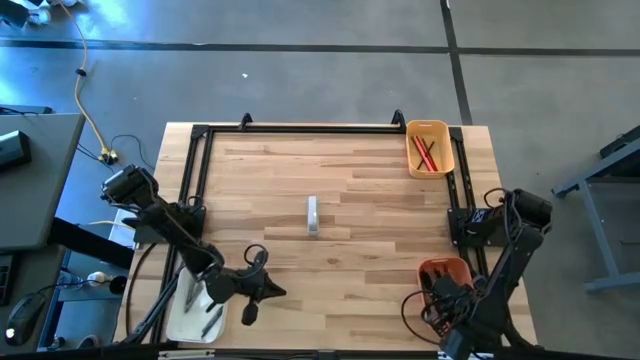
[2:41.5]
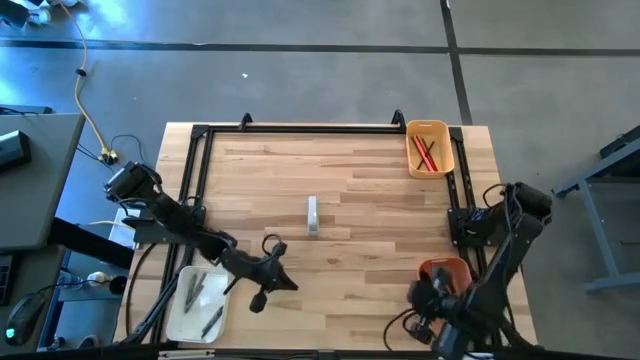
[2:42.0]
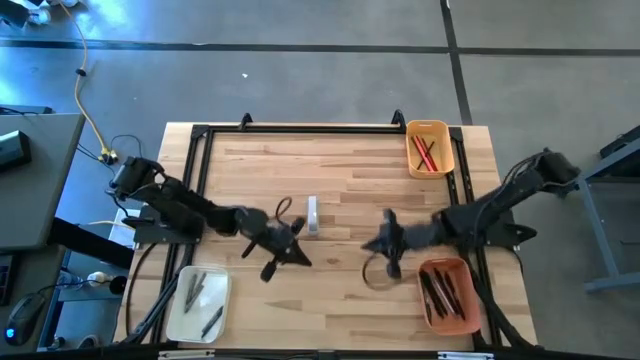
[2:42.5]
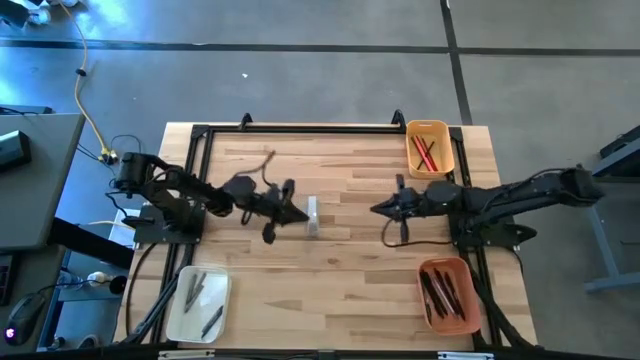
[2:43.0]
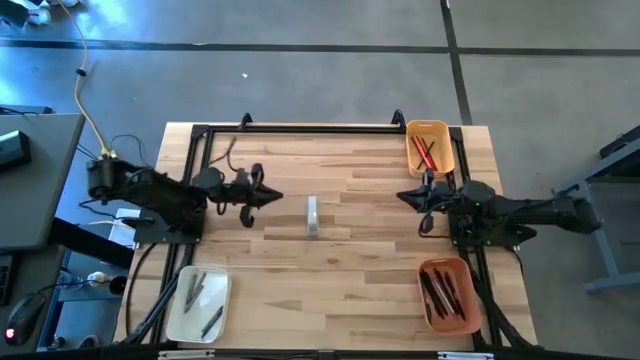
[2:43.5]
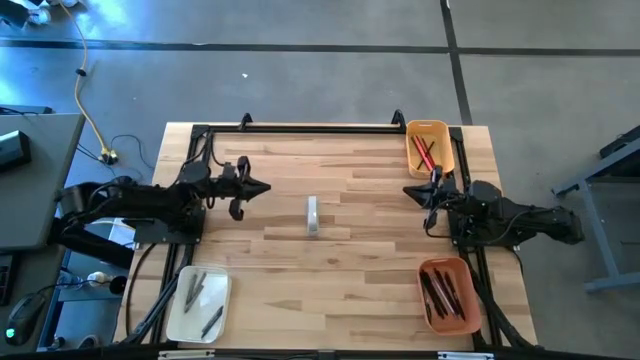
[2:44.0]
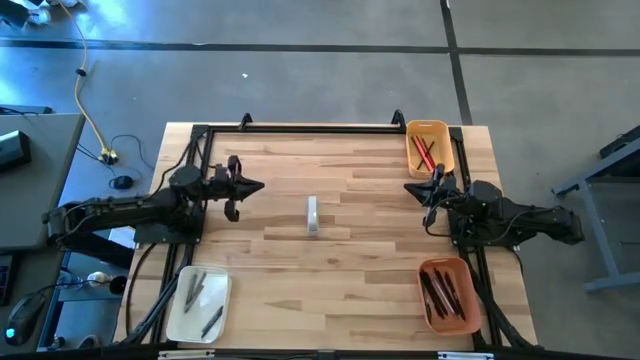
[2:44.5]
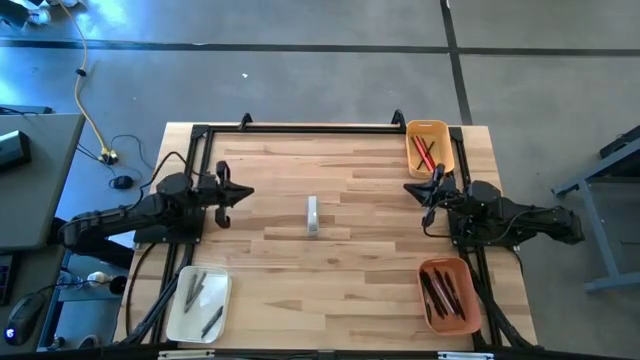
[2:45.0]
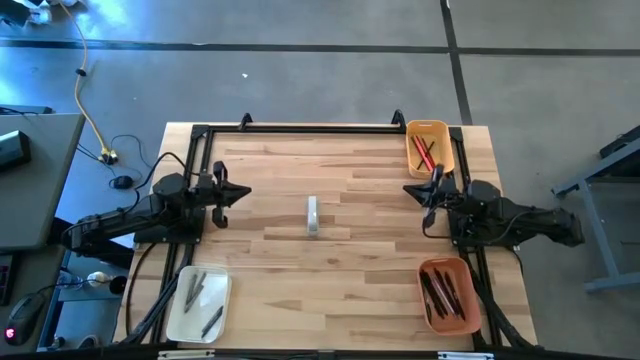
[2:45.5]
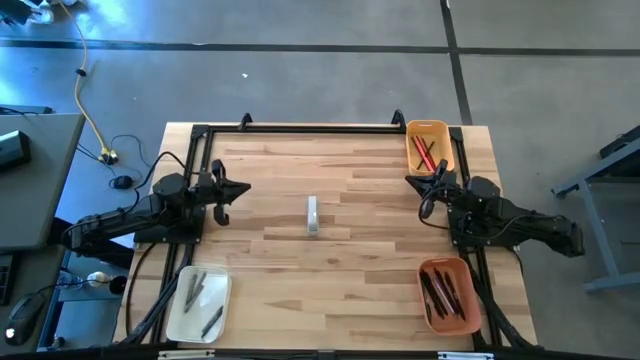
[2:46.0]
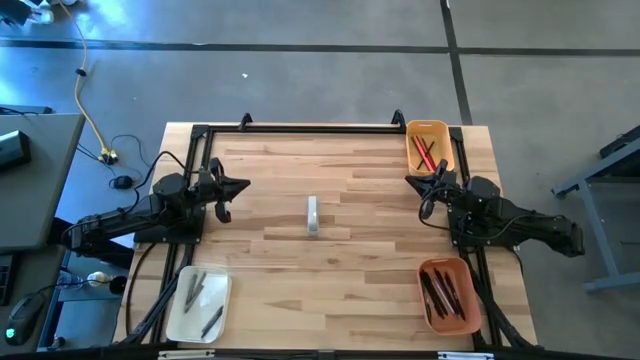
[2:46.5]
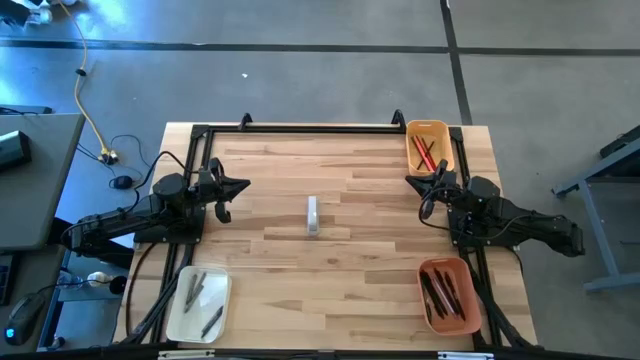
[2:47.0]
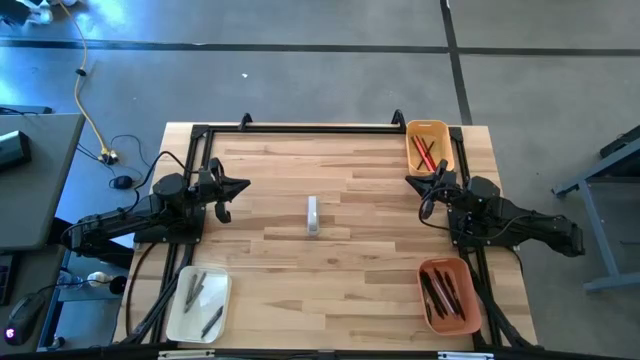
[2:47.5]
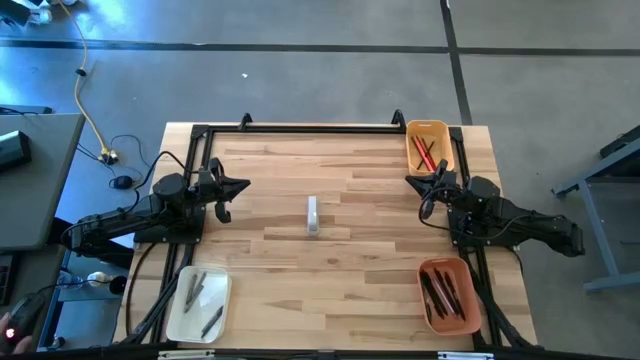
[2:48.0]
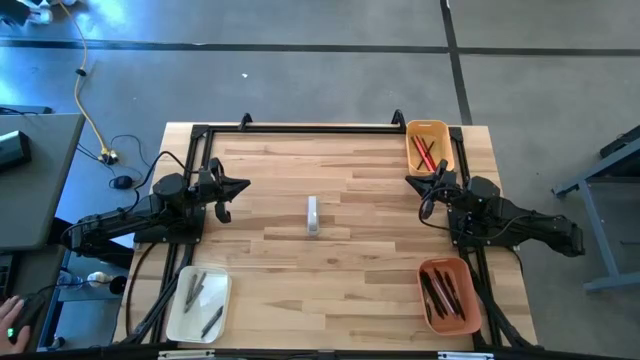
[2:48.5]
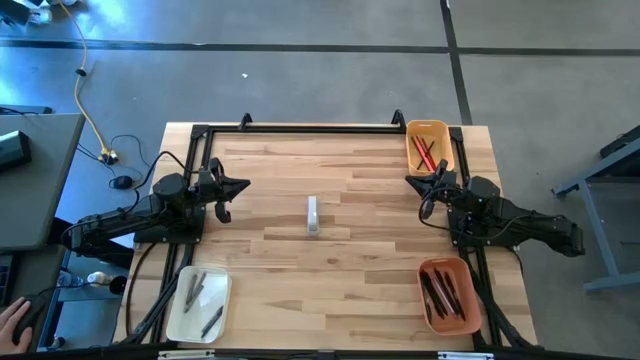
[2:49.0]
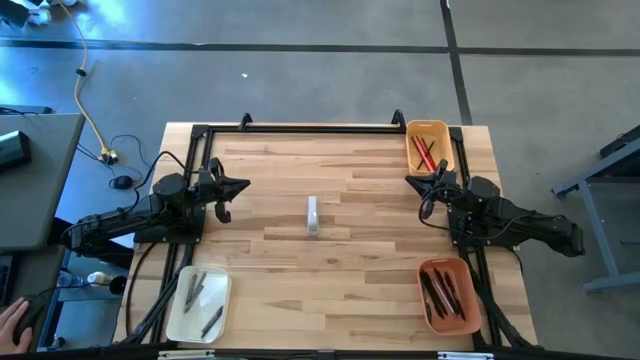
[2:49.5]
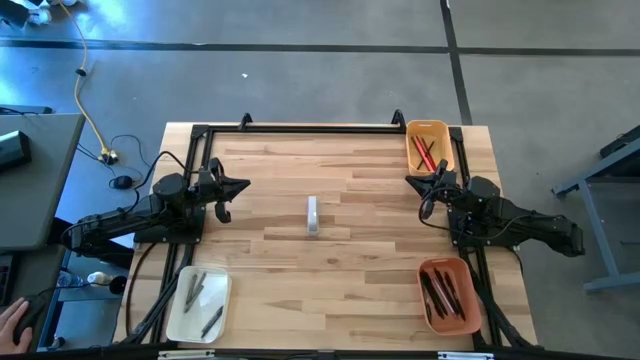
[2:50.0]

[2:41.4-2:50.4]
Task: Sort crayons/erasers/pens/pencils in bins
Return to Home Position

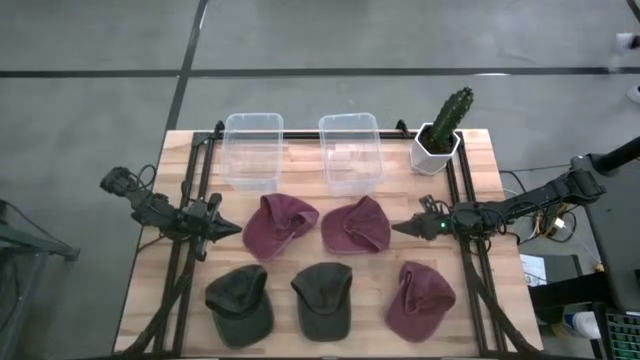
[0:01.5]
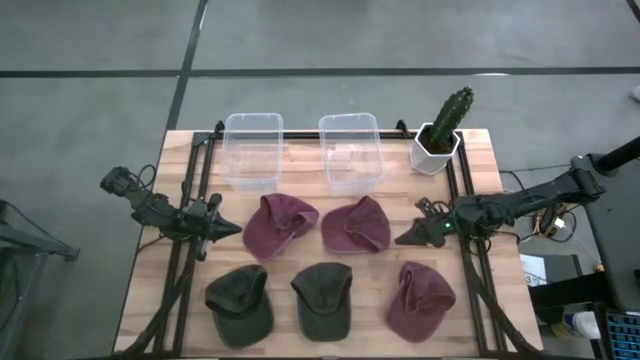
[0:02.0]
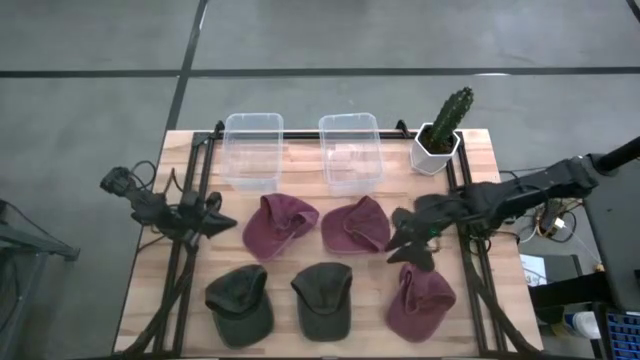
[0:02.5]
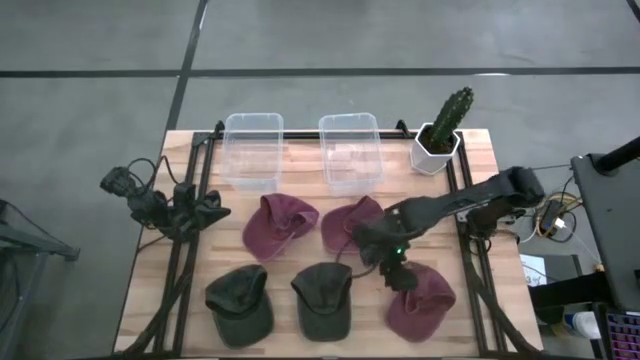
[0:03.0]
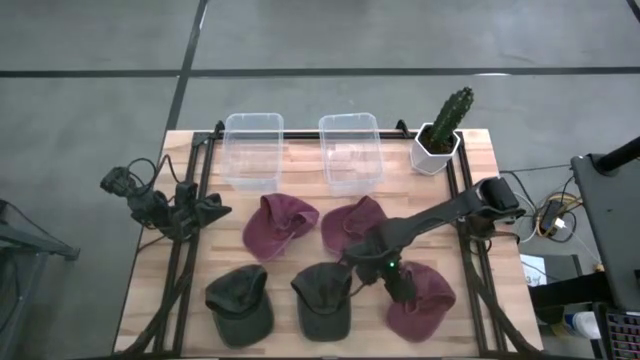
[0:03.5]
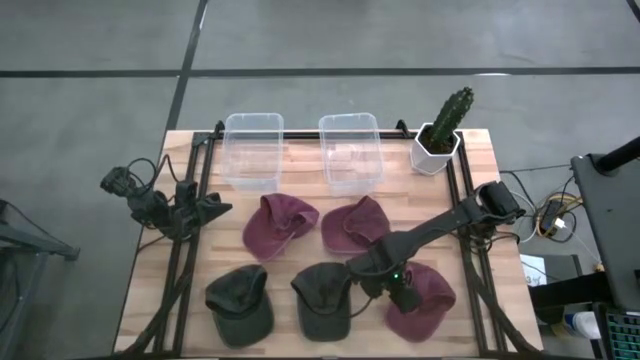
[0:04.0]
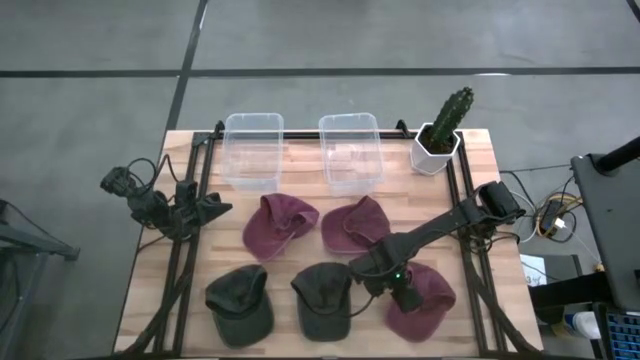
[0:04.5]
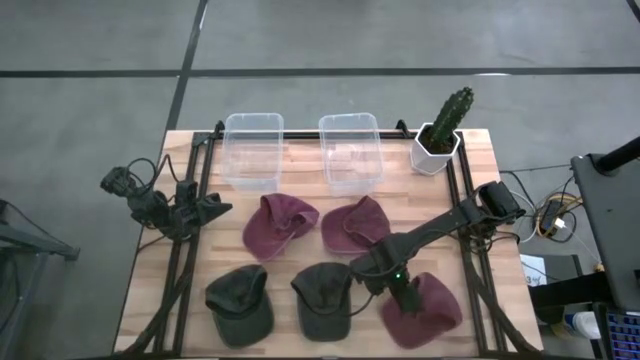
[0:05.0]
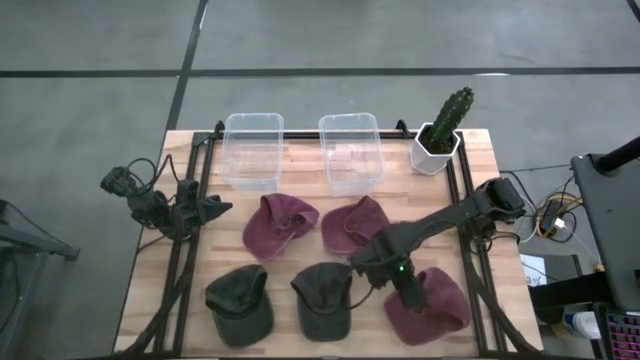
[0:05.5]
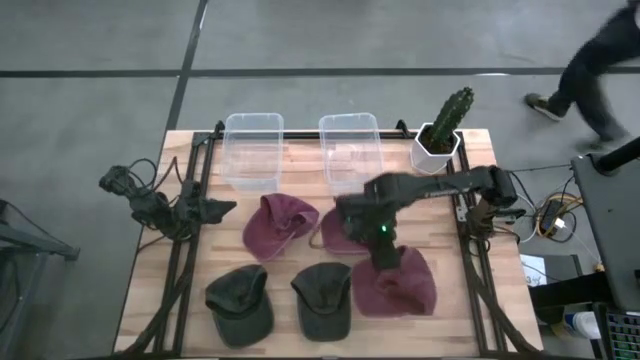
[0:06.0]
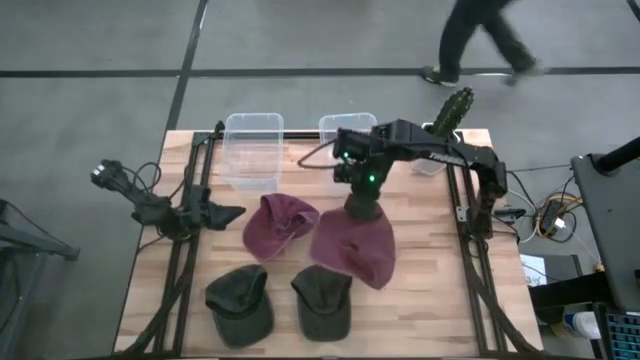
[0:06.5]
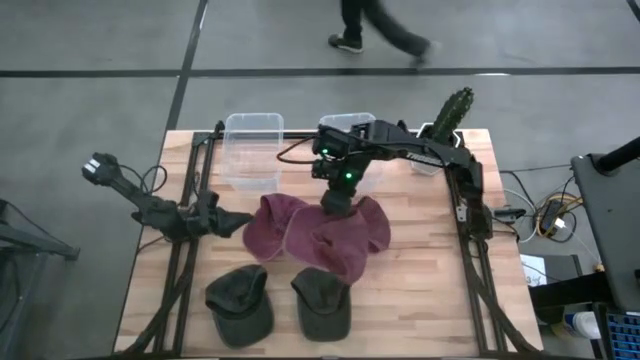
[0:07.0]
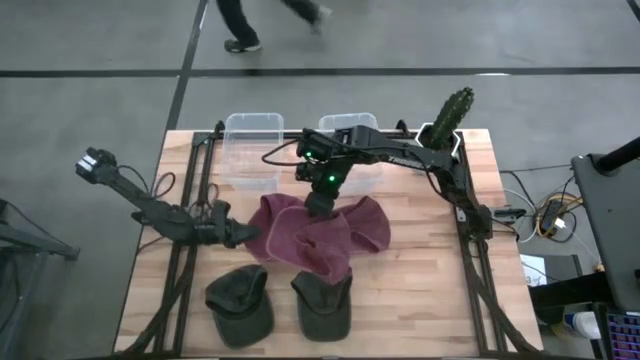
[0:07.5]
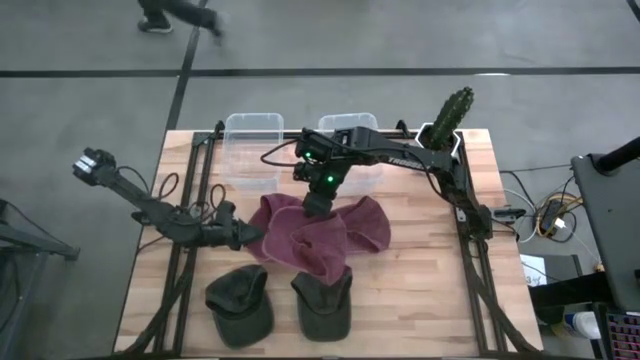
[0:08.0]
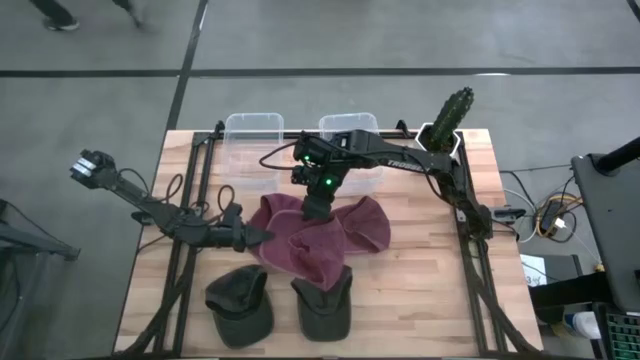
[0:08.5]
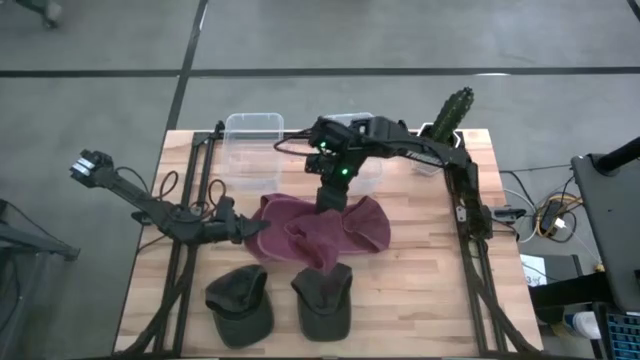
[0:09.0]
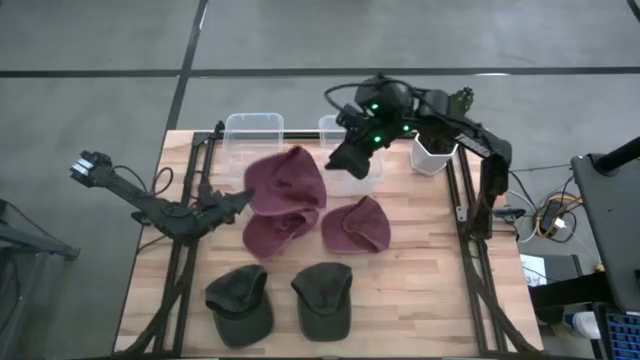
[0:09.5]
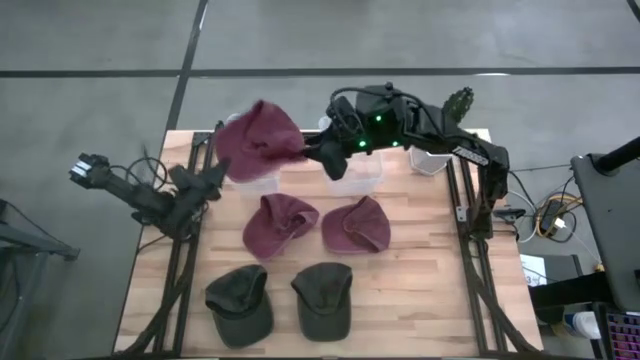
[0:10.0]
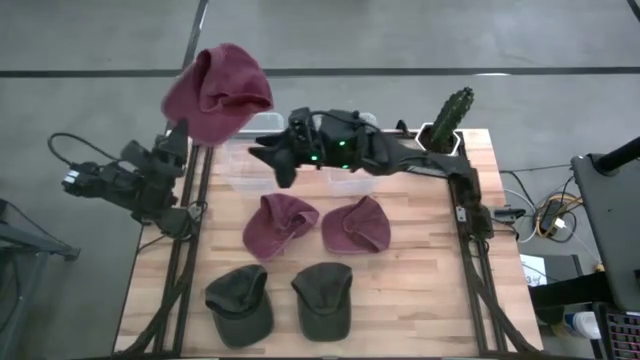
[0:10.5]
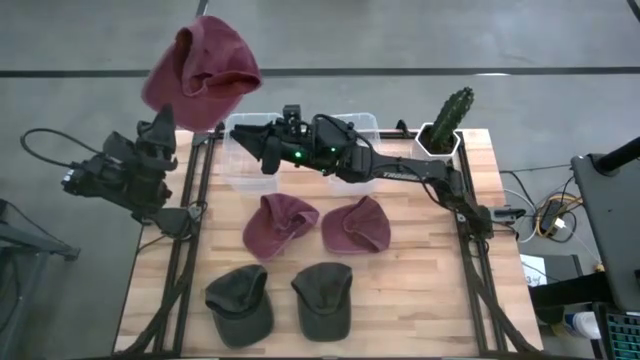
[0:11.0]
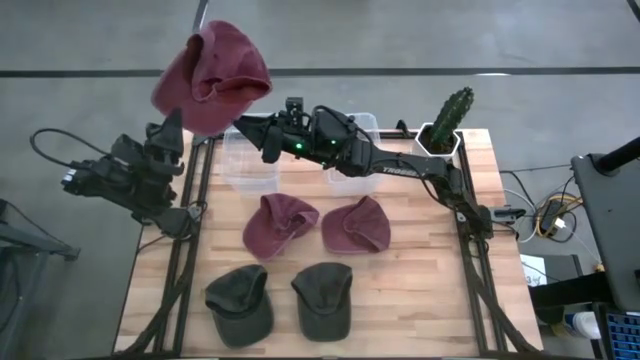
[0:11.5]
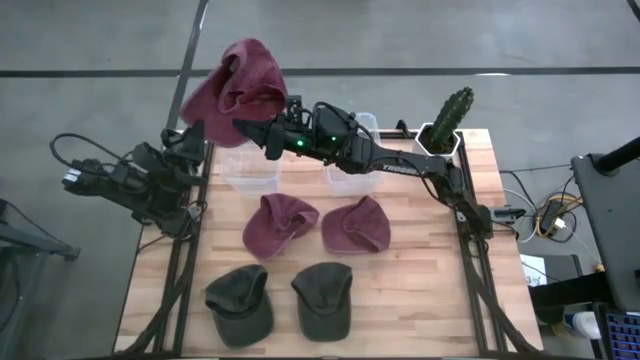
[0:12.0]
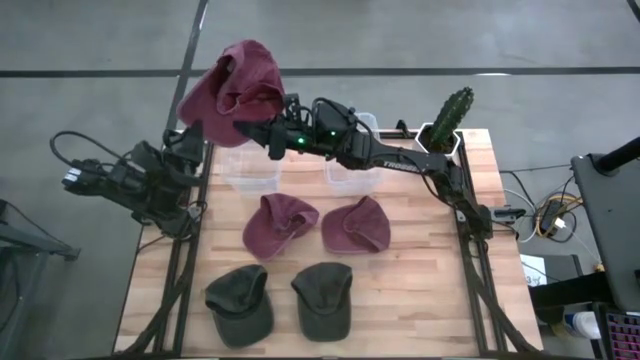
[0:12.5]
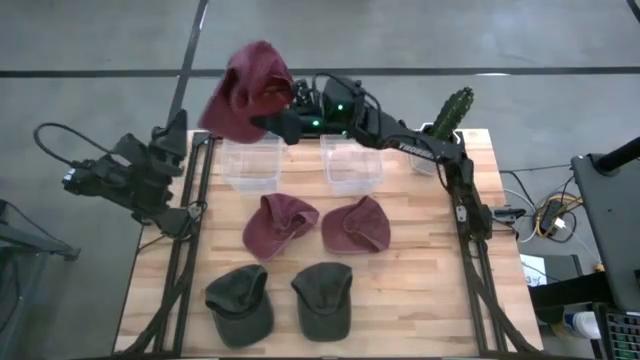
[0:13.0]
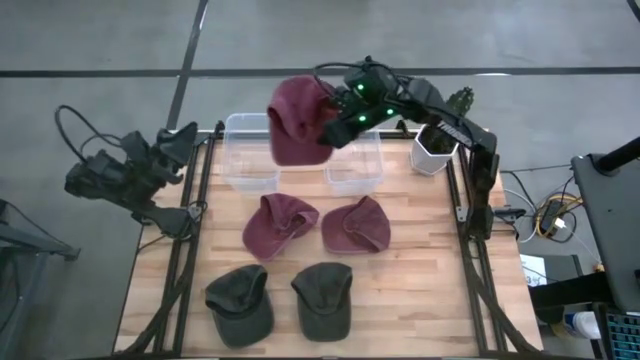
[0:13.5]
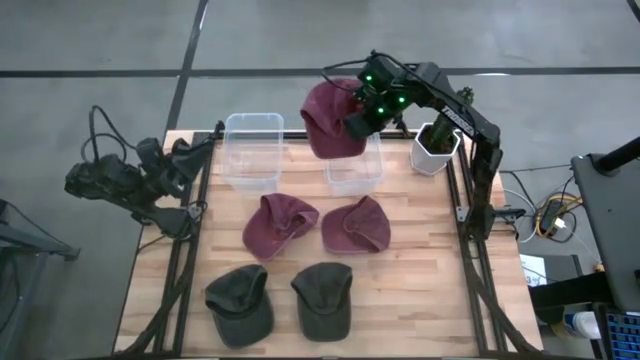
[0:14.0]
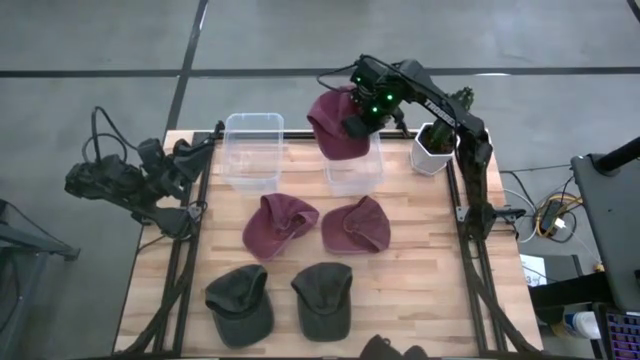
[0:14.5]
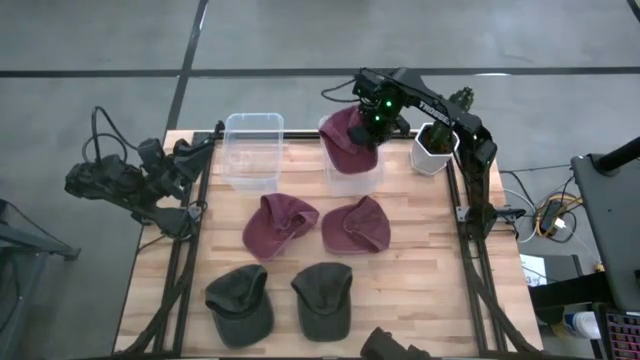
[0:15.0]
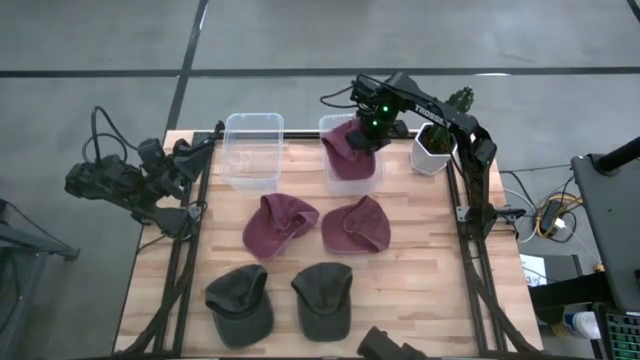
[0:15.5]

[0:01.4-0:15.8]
Task: Pick & Place hat
Put the bottom right red cap into the right transparent bin
